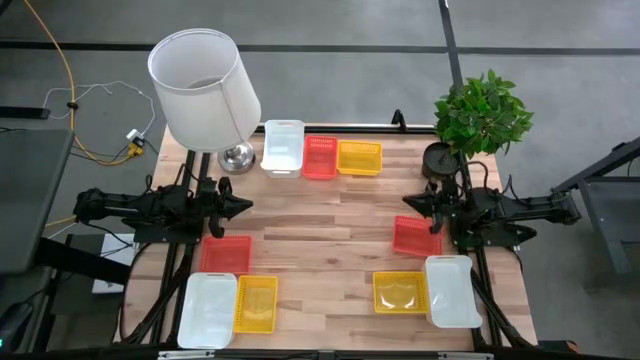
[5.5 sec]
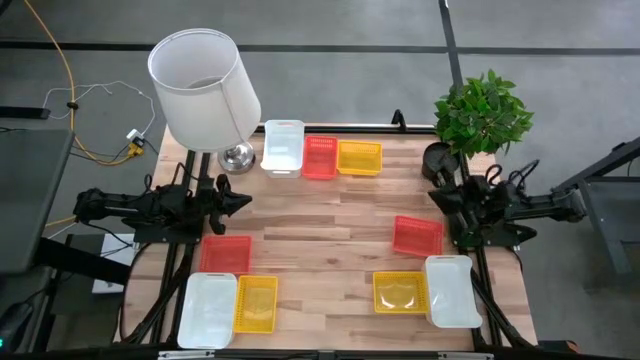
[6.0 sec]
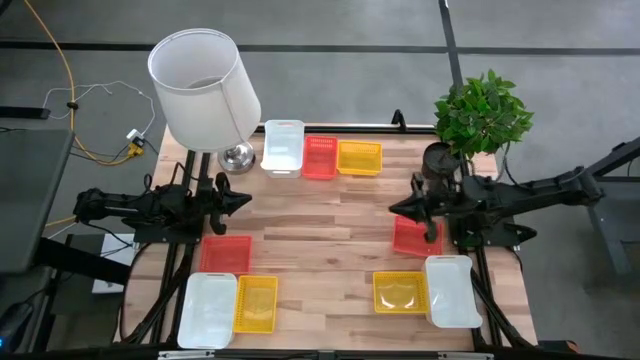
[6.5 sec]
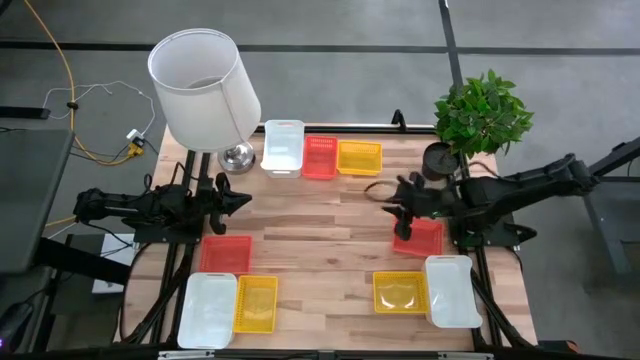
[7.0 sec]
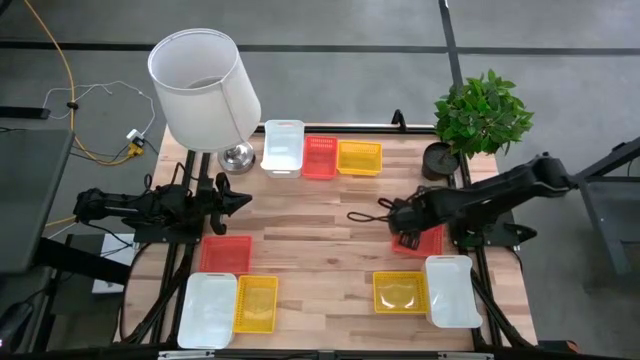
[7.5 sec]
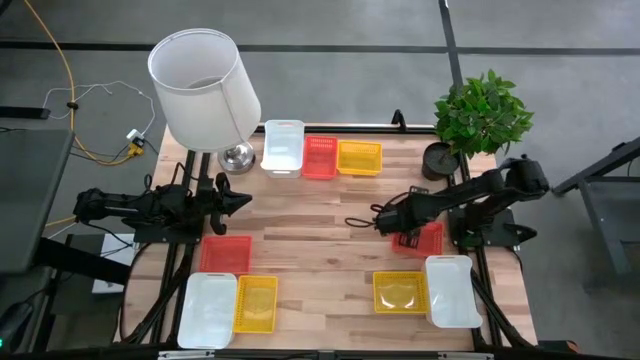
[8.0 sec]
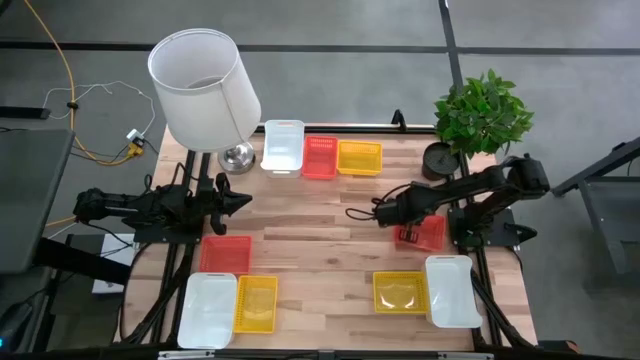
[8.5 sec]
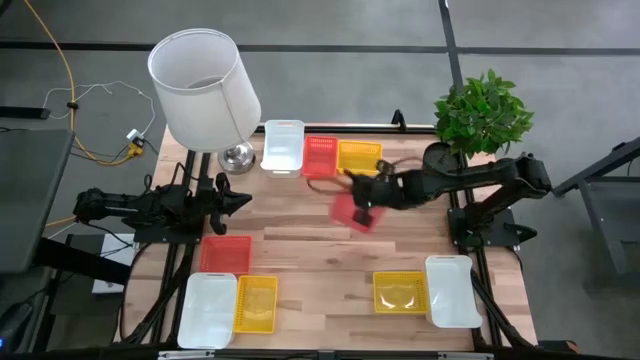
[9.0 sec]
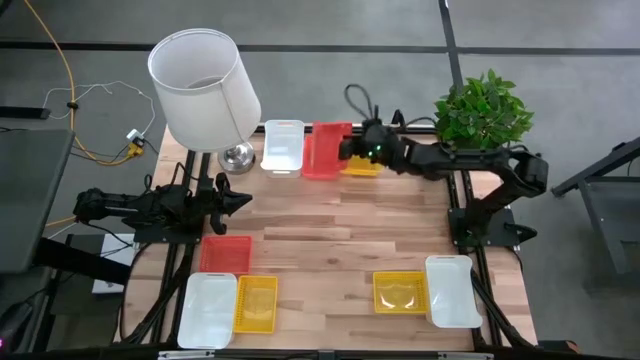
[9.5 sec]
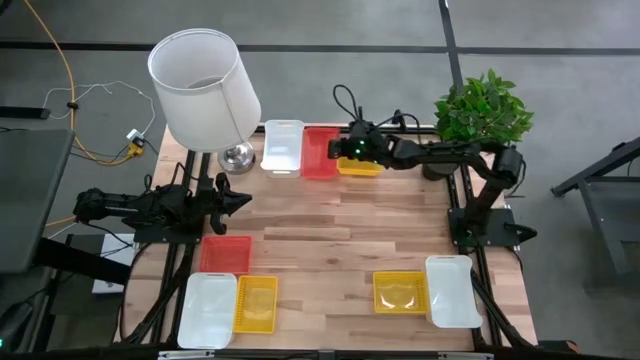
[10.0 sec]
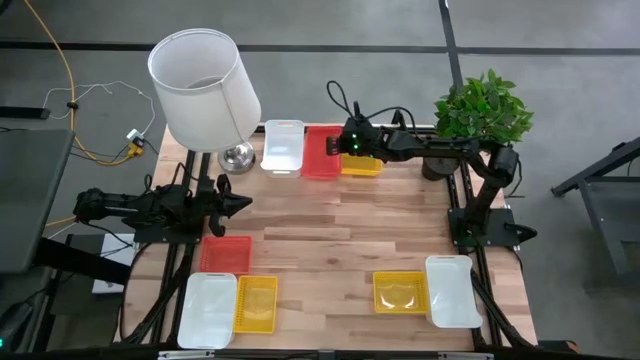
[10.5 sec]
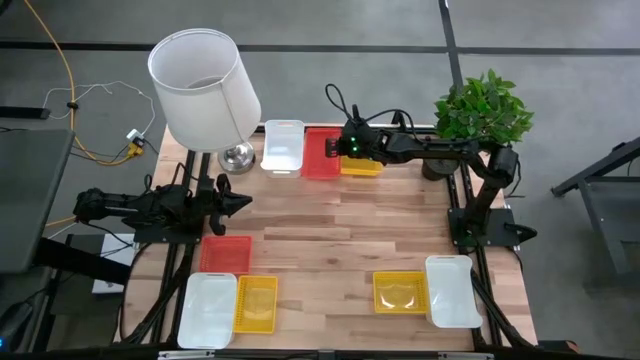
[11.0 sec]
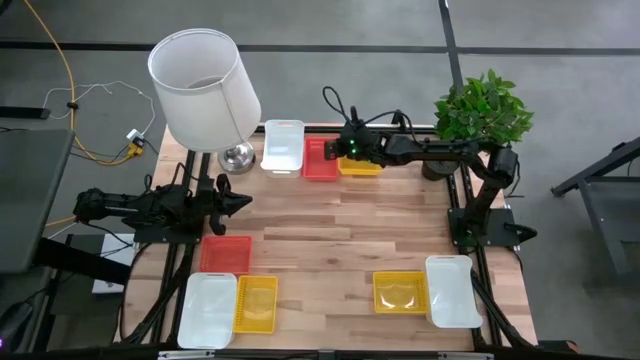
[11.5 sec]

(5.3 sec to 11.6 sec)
Stack the bottom right orange bin on the top orange bin

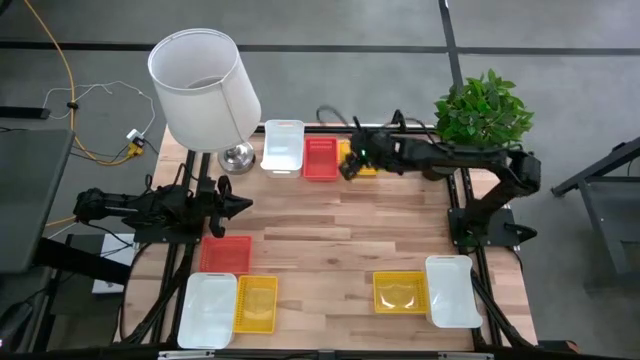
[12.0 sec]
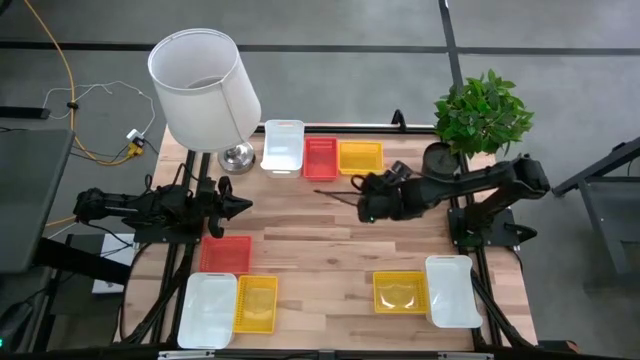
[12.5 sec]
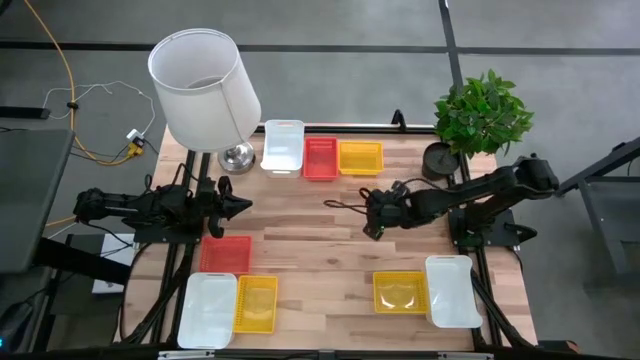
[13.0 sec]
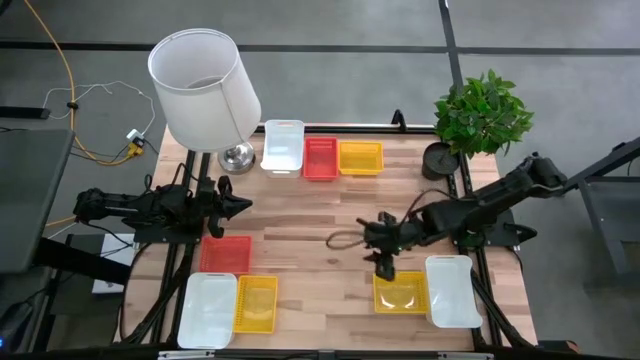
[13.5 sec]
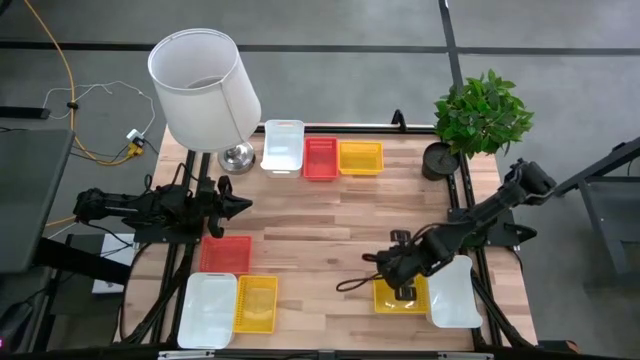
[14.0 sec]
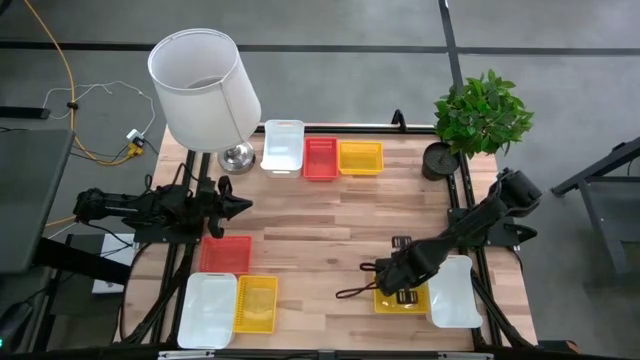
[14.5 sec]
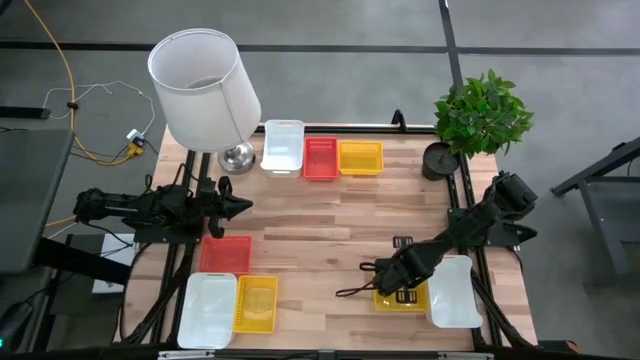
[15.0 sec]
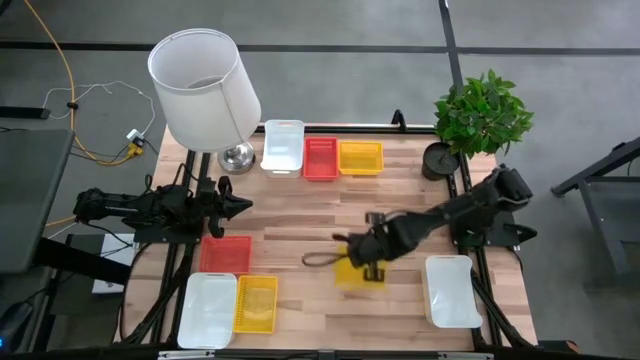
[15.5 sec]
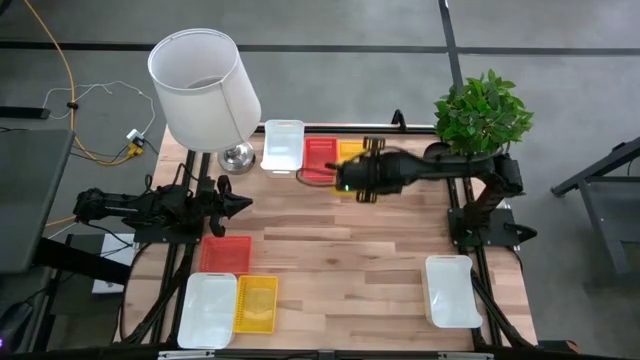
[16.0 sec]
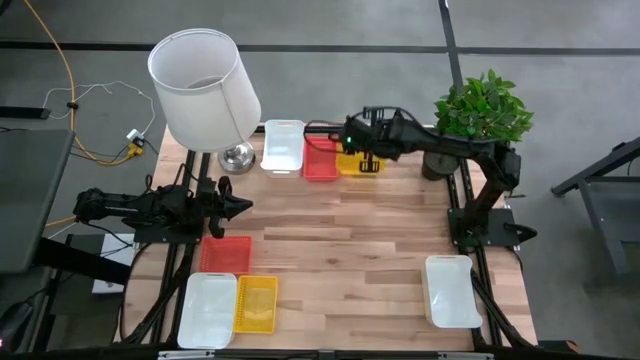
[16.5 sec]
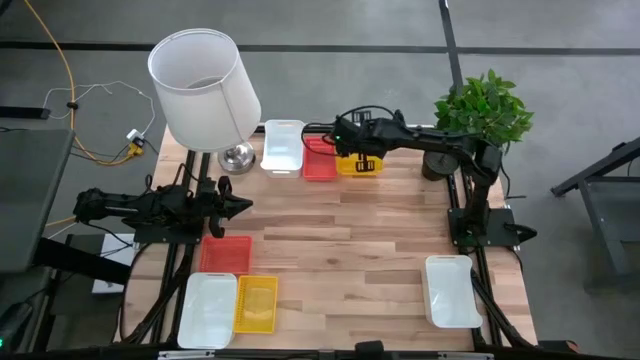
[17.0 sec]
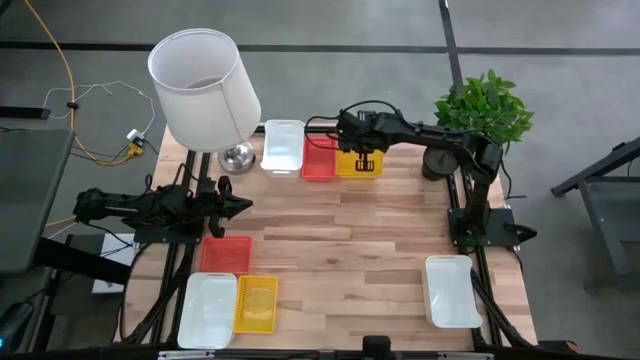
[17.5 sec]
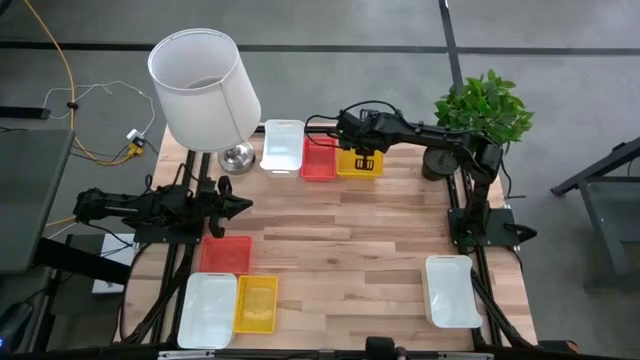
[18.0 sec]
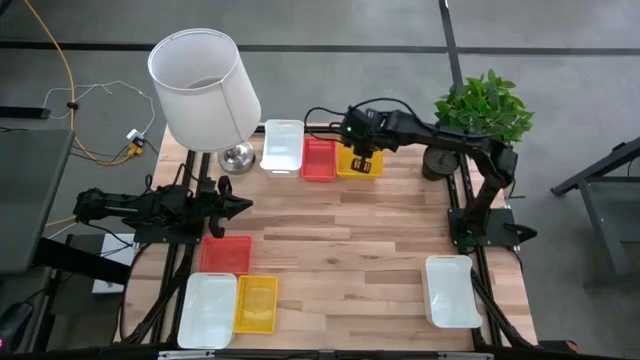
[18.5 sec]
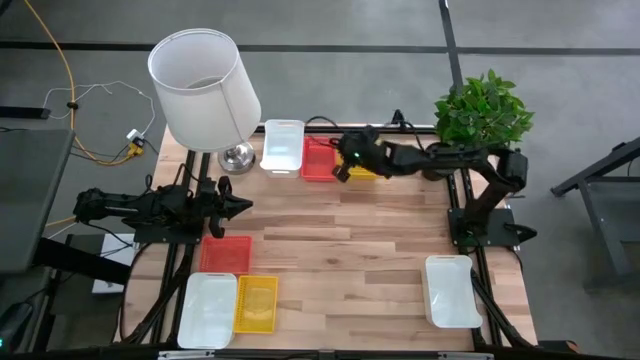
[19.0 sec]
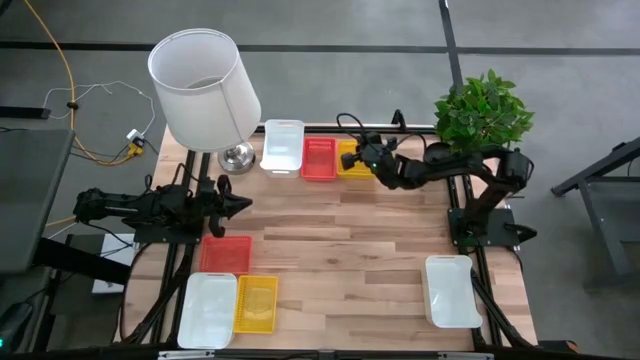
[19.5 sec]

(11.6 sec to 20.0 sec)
Stack the bottom right yellow bin on the top yellow bin

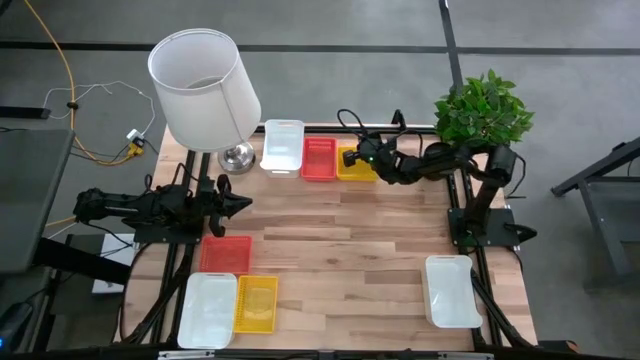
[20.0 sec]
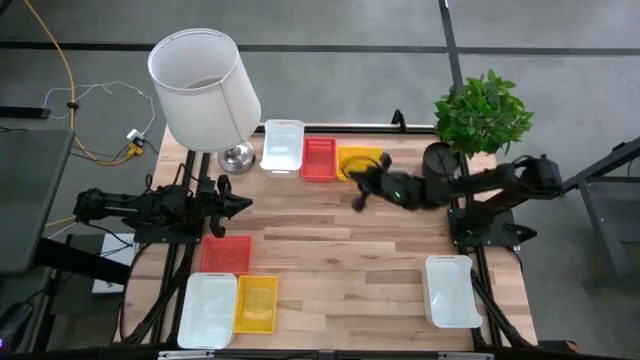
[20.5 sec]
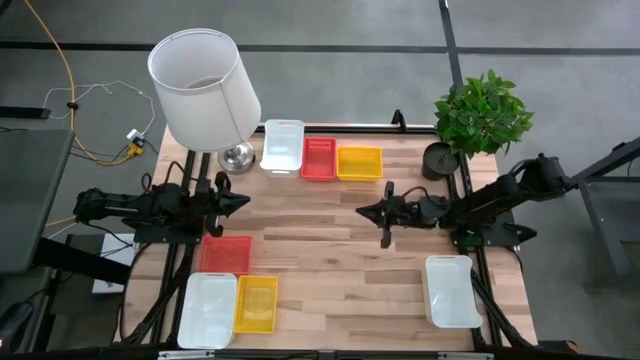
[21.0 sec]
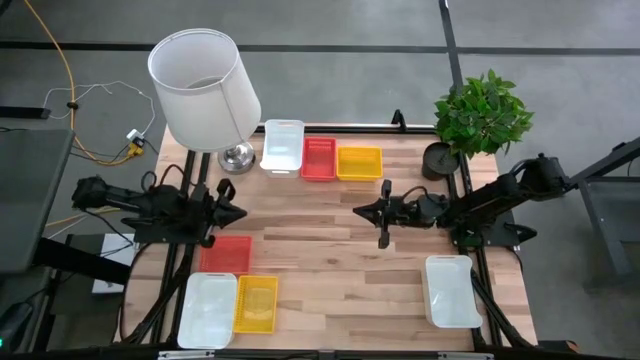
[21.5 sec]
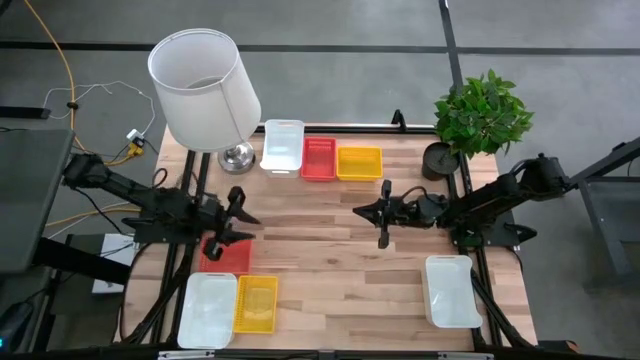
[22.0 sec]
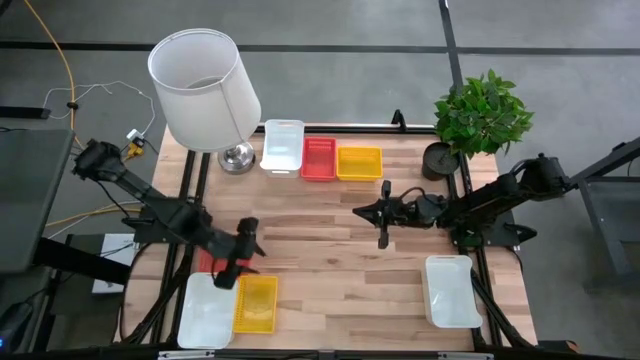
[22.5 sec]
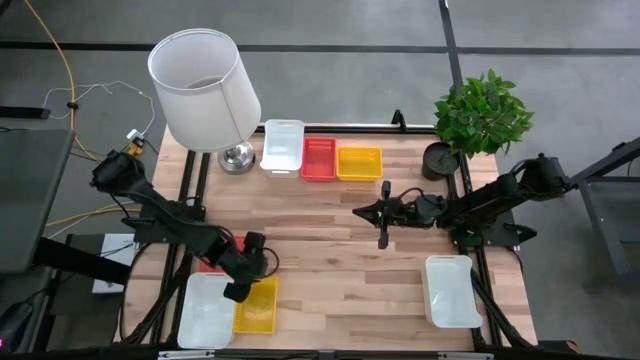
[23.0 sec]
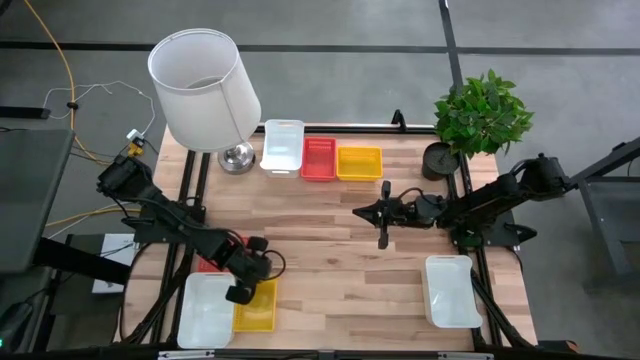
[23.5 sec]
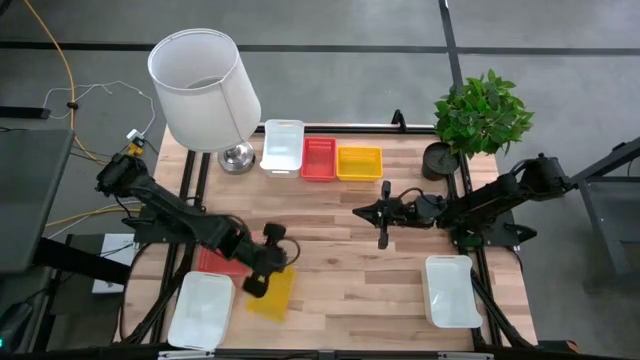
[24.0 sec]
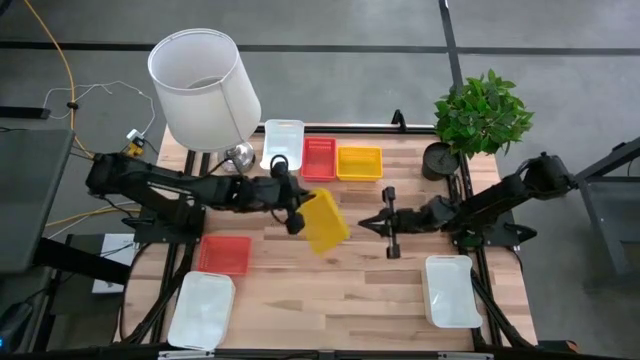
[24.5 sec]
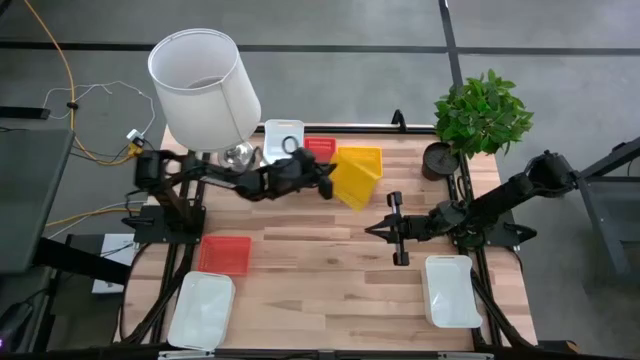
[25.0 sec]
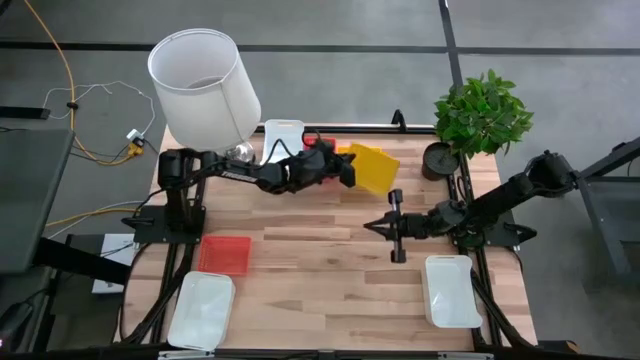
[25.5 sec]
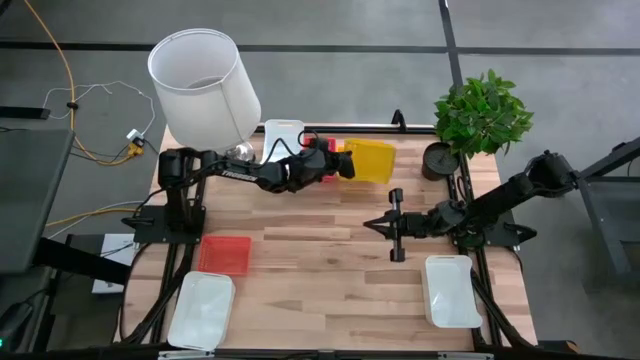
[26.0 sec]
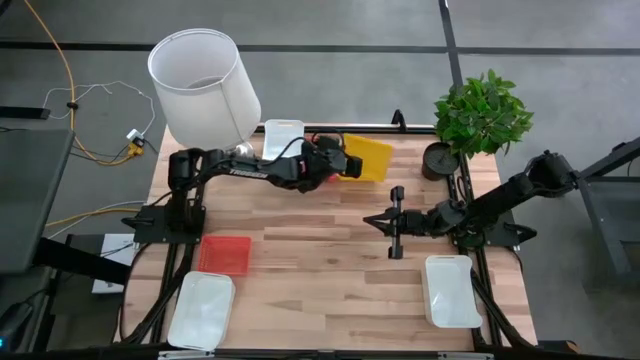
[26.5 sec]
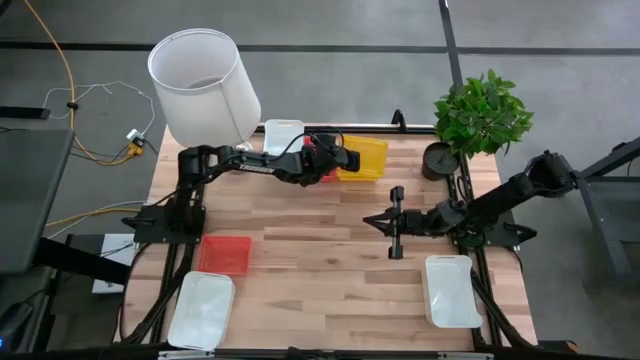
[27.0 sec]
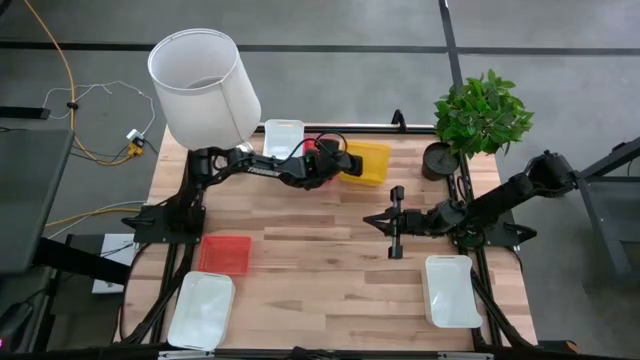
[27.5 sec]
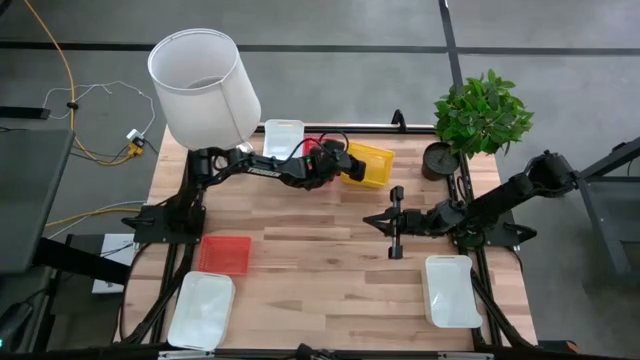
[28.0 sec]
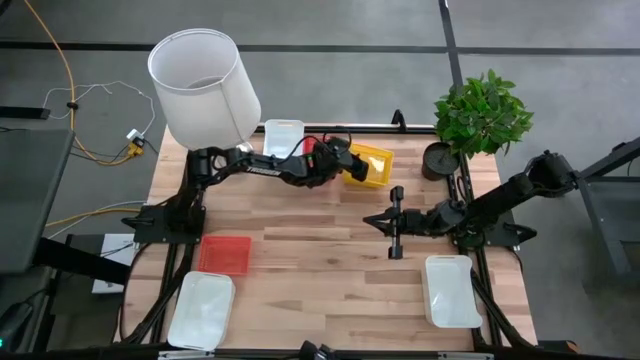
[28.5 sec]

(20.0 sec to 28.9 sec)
Stack the bottom yellow bin on the yellow bin
